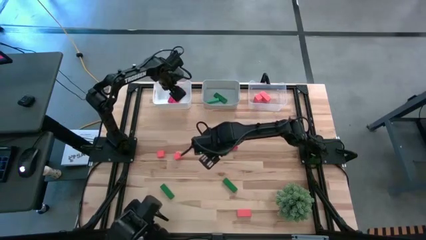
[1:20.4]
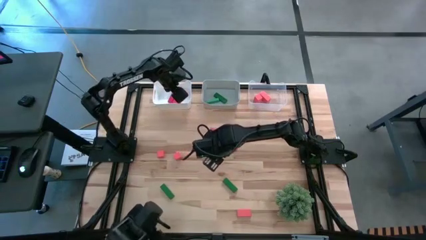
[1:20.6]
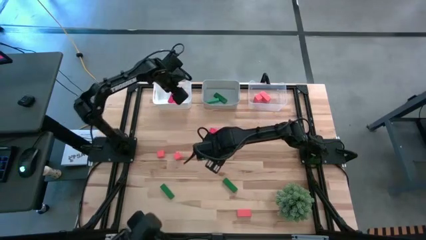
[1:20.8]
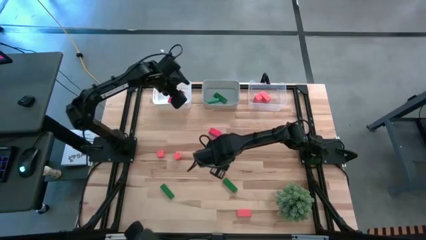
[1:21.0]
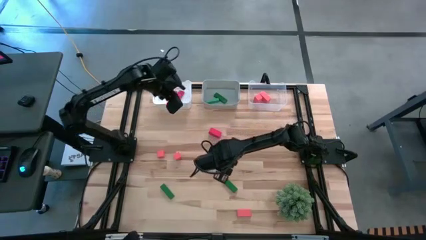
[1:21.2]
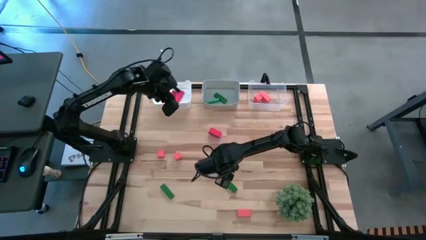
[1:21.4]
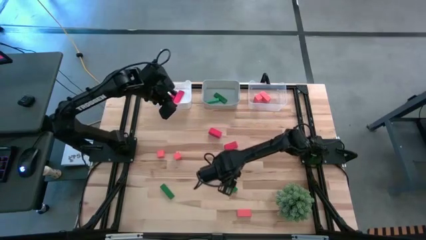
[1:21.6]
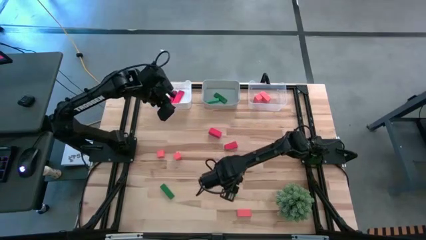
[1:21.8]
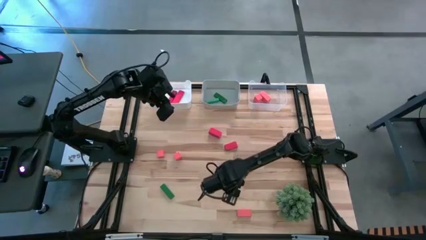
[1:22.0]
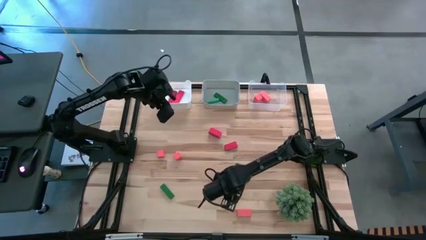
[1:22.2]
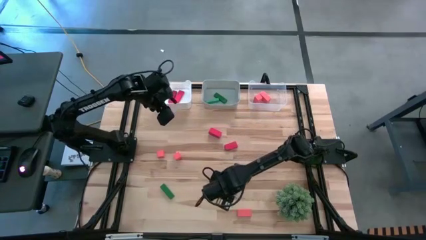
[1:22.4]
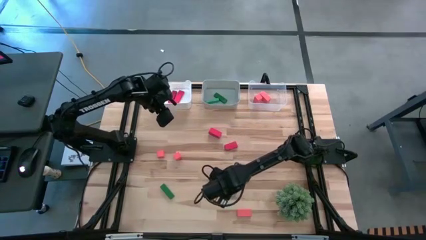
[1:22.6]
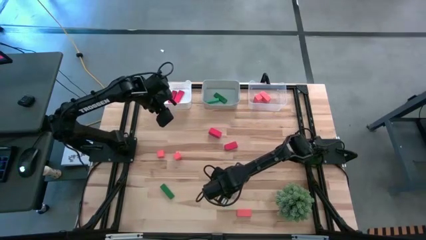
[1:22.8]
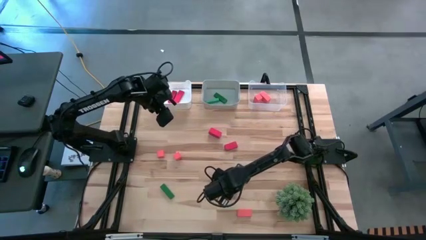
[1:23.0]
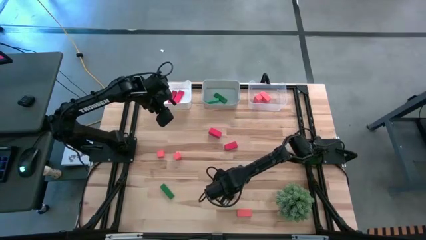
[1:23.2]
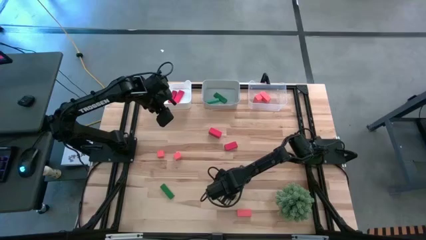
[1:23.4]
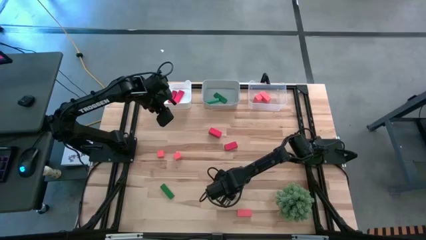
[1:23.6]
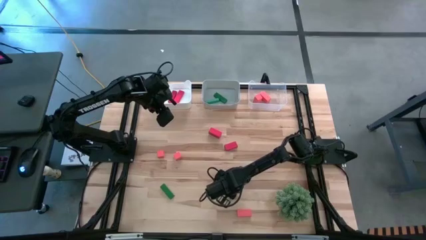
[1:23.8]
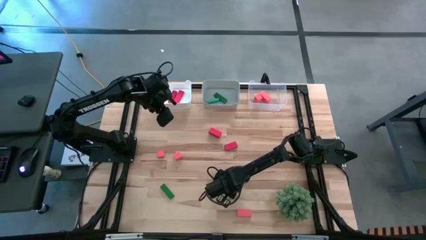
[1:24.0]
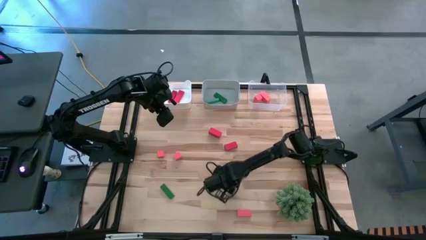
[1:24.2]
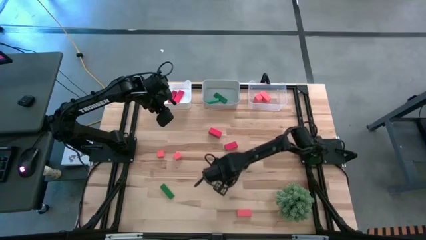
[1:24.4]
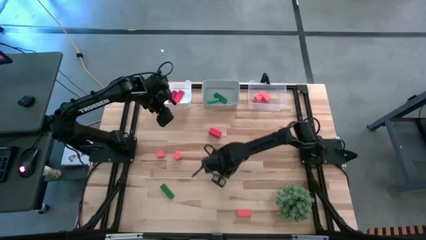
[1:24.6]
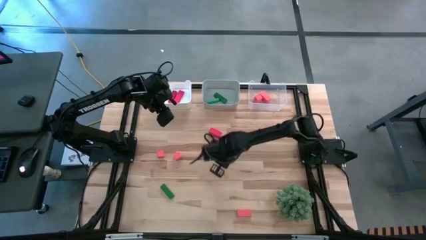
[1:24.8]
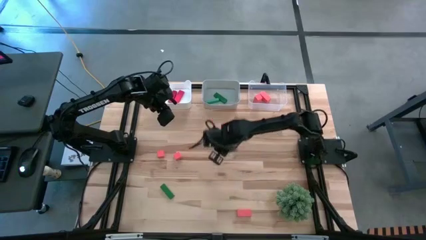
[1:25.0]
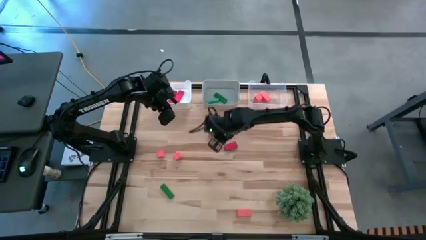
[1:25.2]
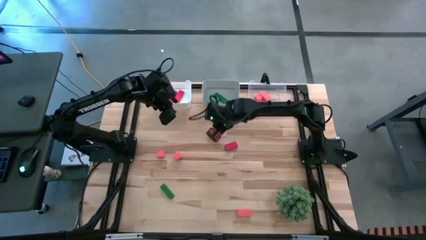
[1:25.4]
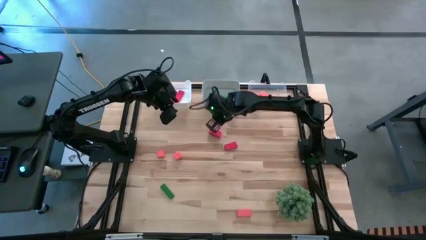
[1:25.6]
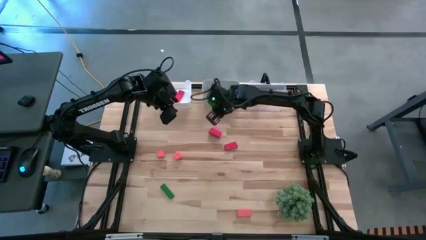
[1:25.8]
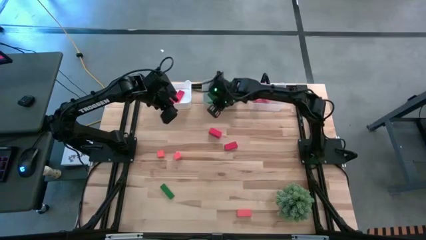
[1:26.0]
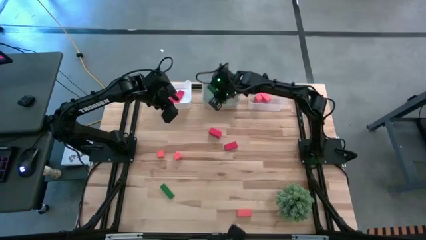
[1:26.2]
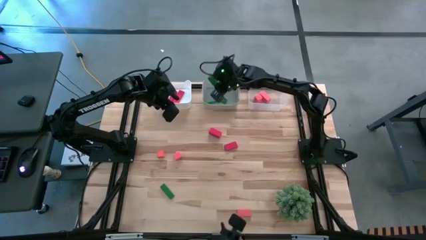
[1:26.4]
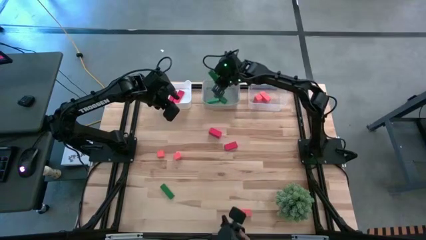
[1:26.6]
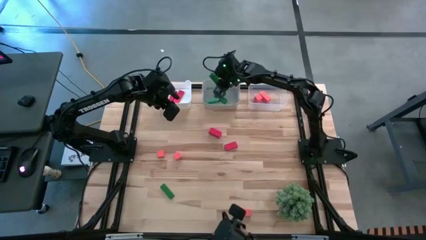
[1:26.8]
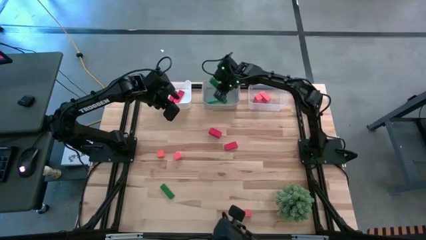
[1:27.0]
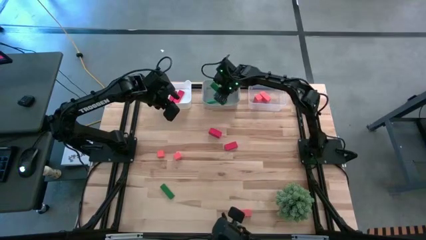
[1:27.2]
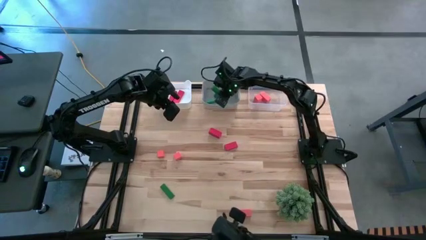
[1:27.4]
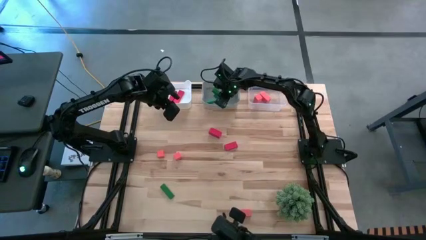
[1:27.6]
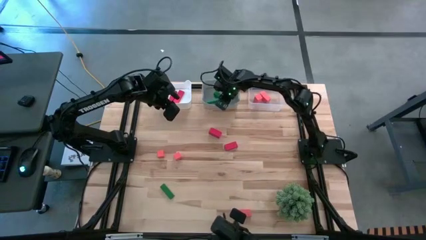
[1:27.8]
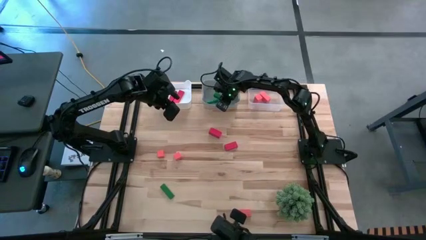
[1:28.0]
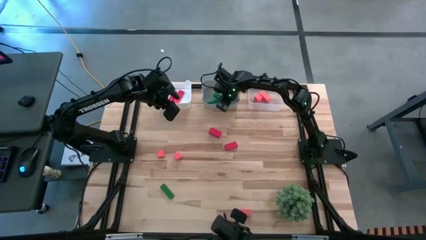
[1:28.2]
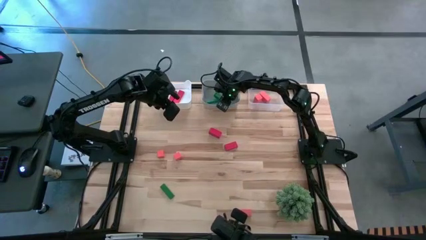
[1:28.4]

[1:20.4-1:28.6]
Task: Sort & place blocks by color
Put the right green block into the grey bin

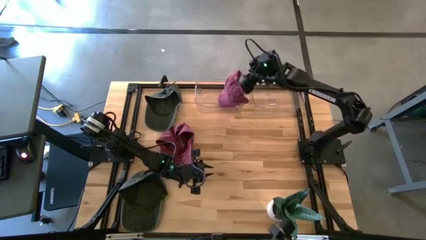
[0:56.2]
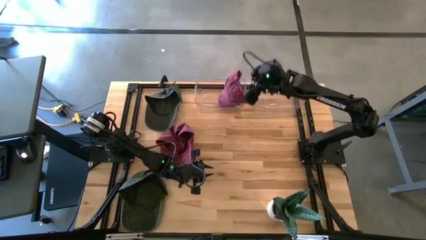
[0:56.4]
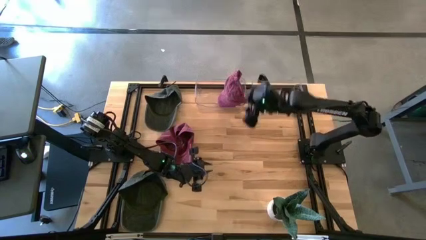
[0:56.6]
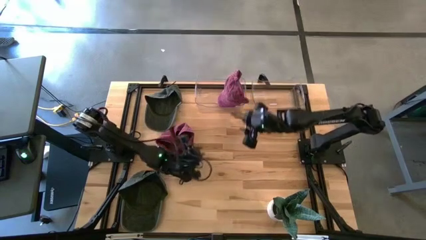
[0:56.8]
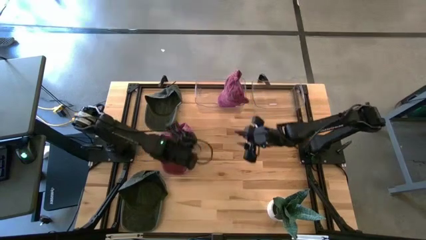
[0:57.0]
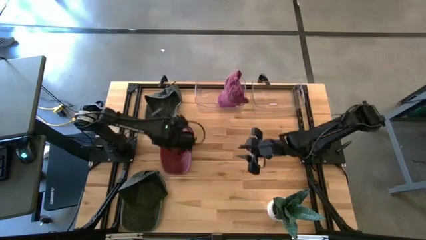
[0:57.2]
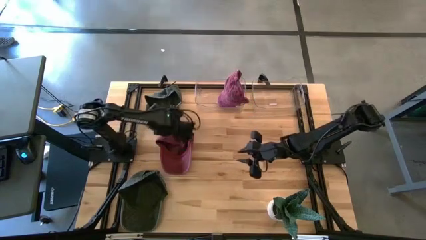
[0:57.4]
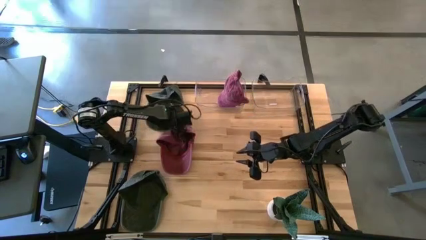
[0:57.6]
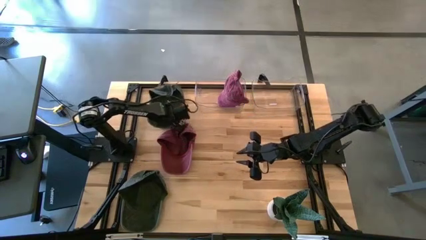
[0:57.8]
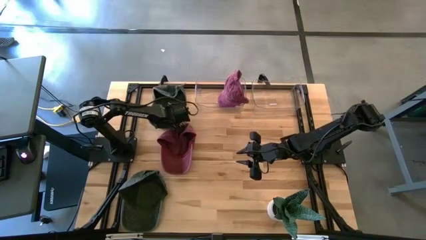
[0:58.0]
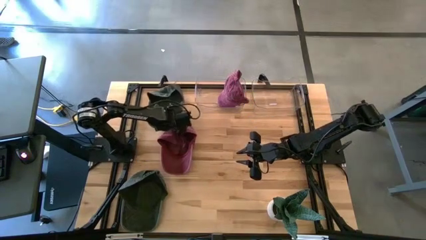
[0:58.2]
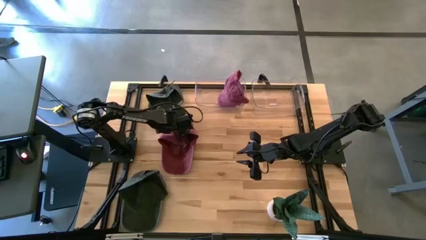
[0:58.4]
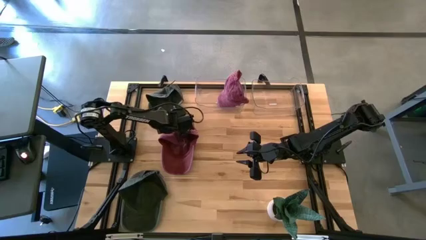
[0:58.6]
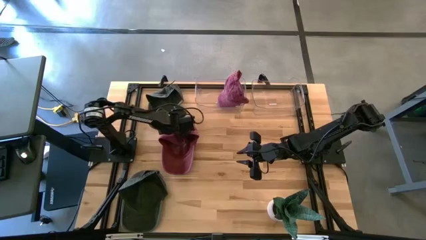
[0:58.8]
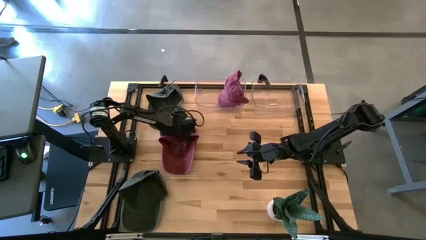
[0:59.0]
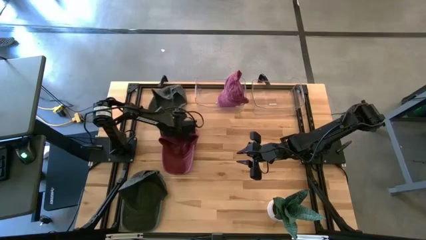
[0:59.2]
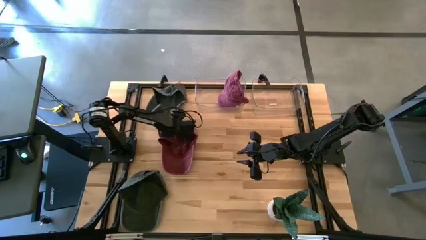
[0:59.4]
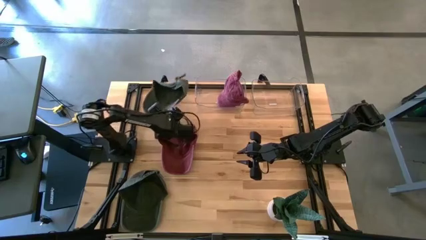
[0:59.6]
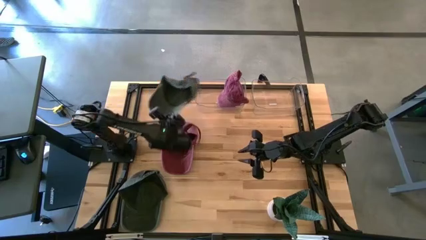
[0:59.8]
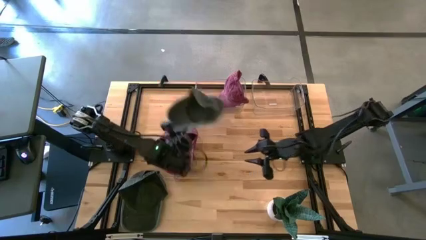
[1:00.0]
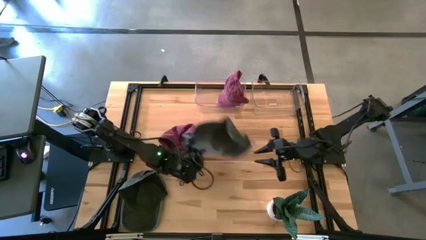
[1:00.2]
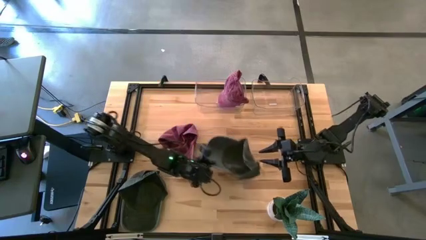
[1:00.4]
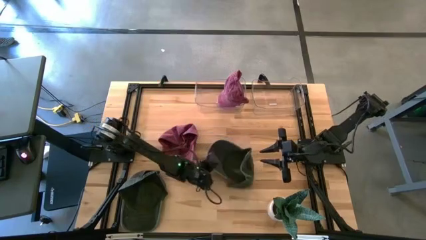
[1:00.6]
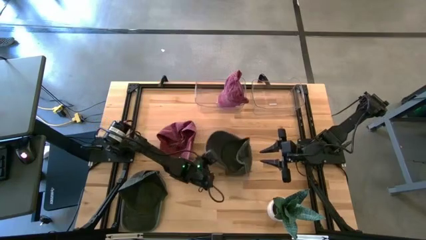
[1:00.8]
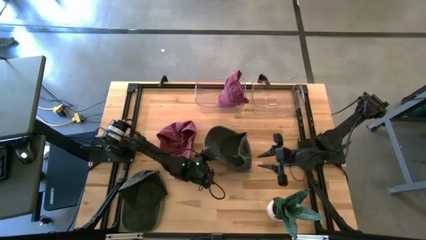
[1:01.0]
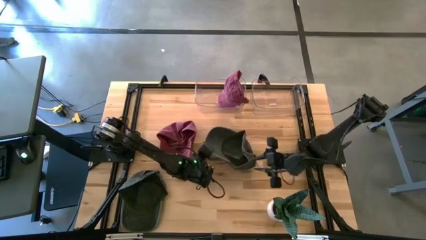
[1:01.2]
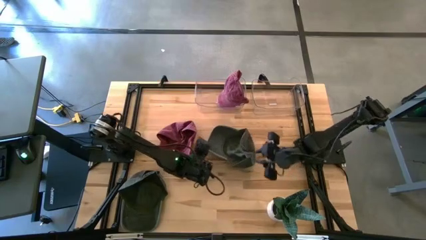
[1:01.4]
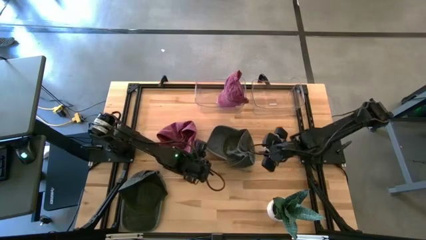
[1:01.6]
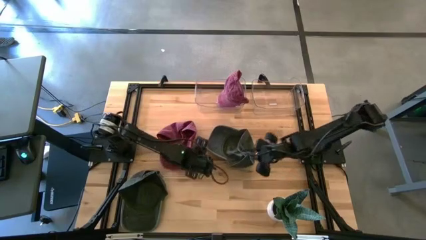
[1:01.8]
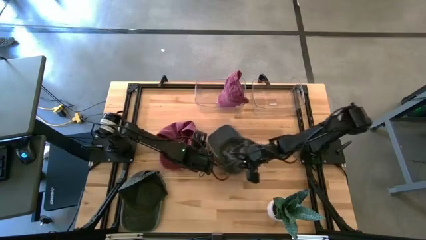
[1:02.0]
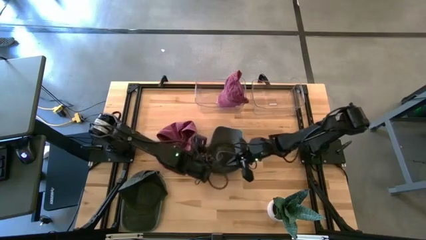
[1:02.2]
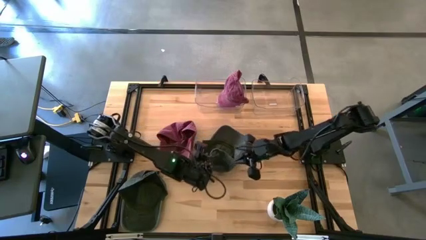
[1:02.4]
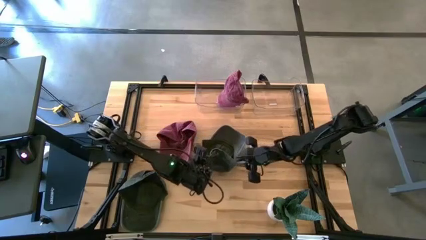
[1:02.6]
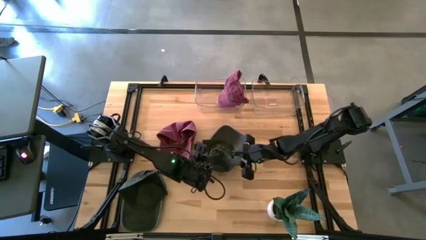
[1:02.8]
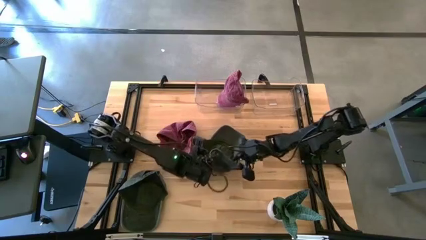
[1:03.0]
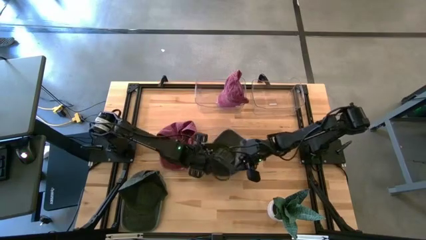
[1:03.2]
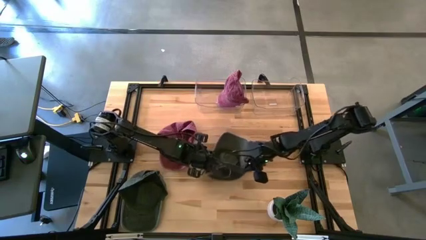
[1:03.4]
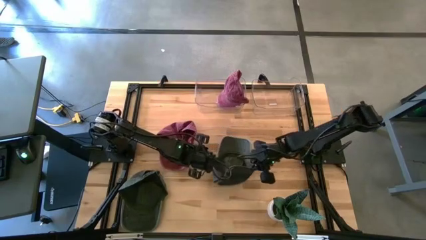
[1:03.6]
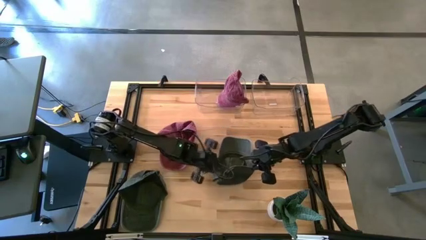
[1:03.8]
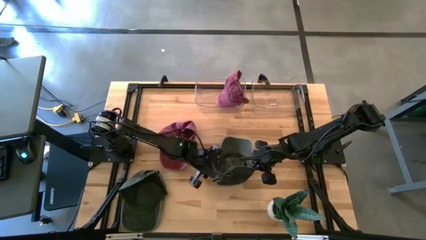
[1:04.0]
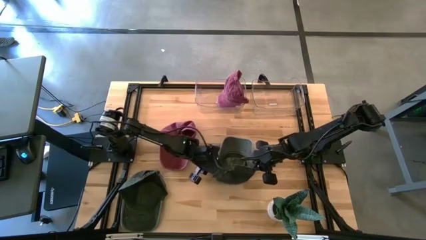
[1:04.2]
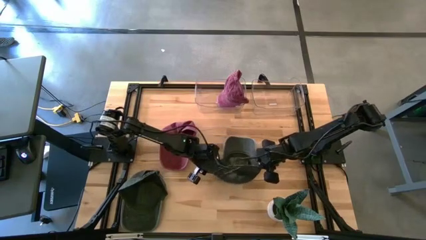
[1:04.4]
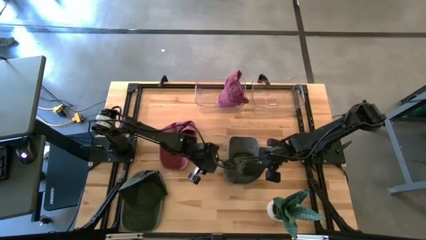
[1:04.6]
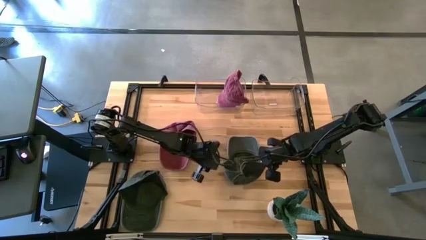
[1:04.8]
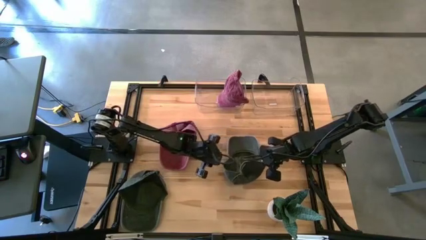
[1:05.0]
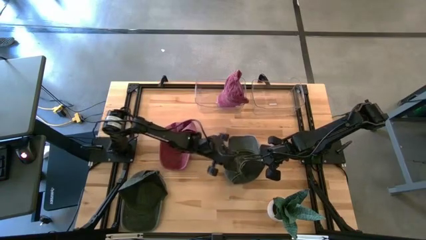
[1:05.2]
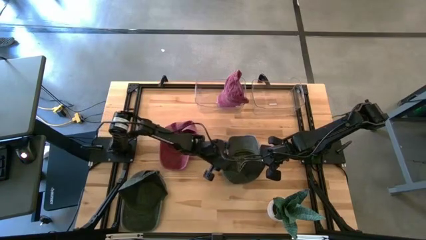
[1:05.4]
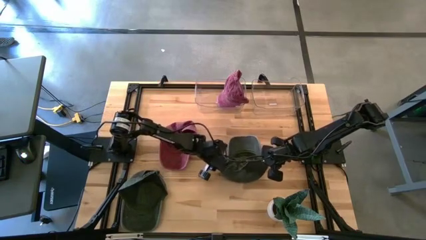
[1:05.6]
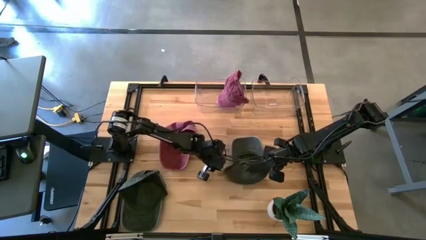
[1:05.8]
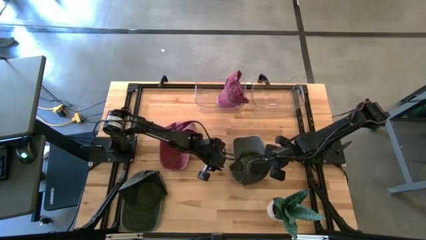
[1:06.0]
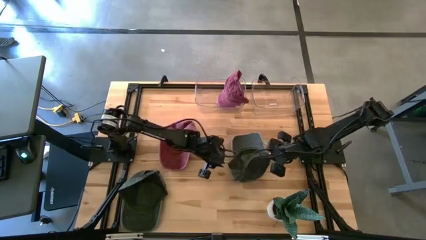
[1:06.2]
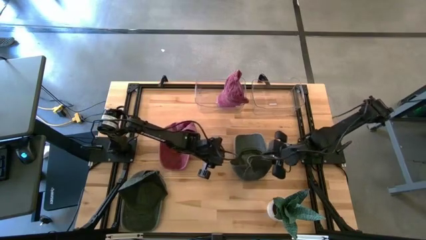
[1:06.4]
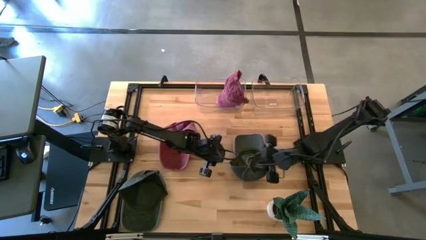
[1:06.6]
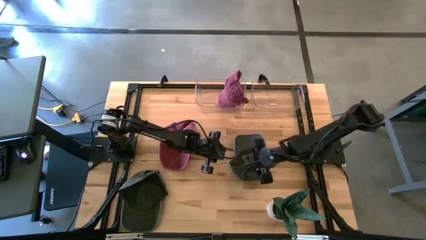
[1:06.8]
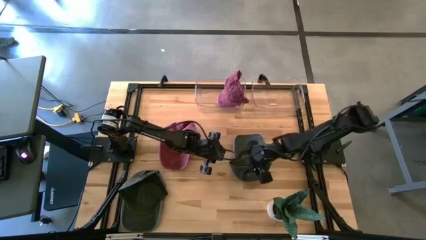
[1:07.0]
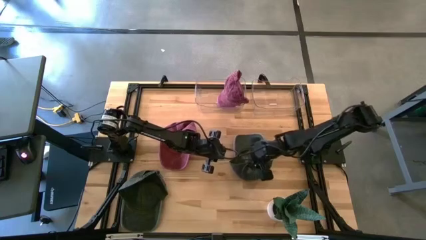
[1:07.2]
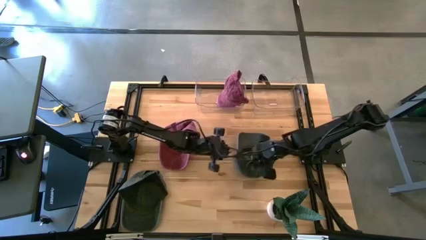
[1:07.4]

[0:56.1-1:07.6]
Task: Pick & Place hat
Put the top black cap into the right transparent bin
